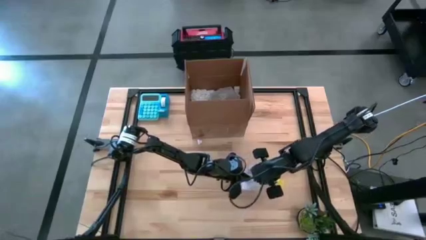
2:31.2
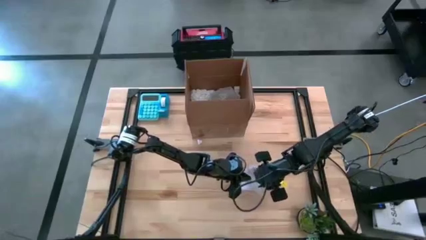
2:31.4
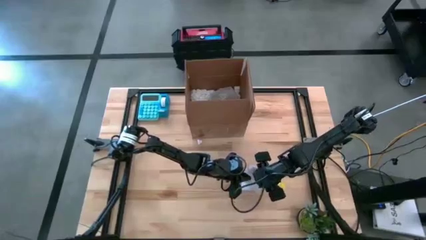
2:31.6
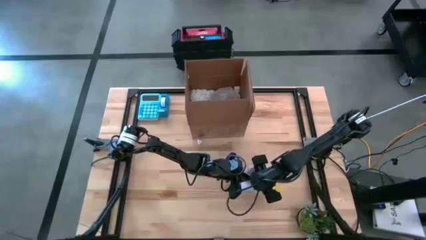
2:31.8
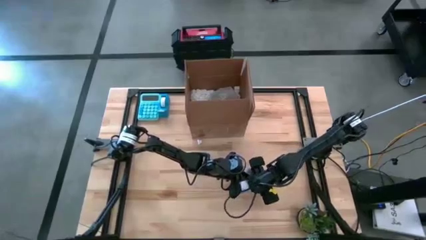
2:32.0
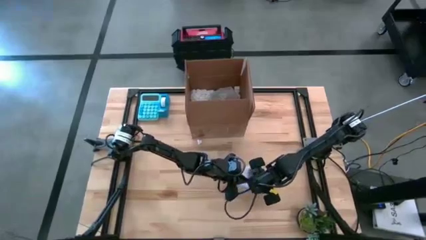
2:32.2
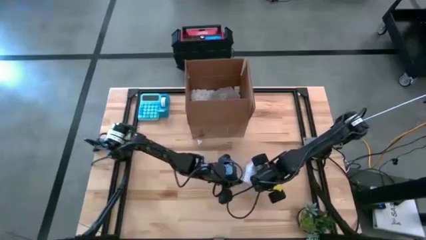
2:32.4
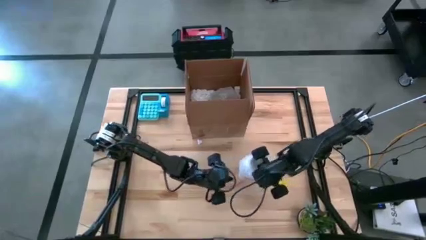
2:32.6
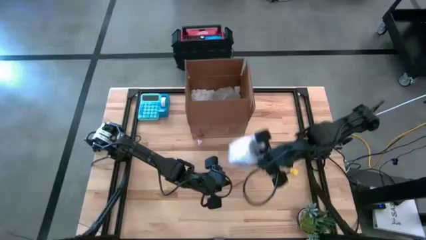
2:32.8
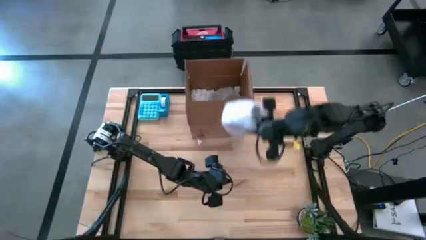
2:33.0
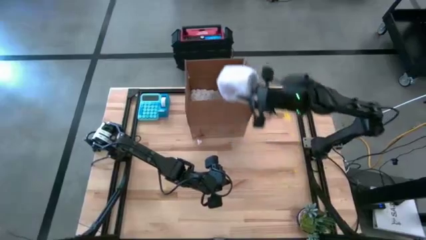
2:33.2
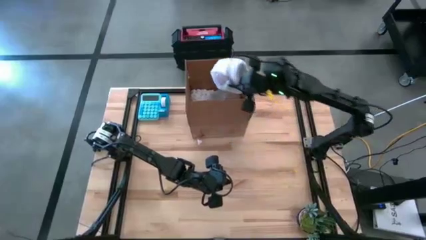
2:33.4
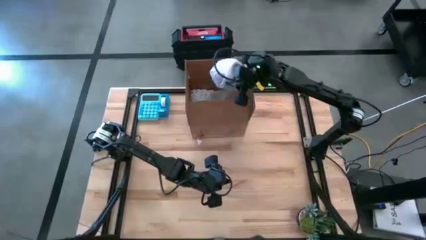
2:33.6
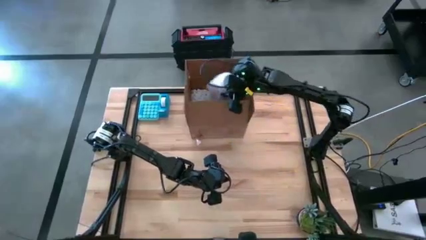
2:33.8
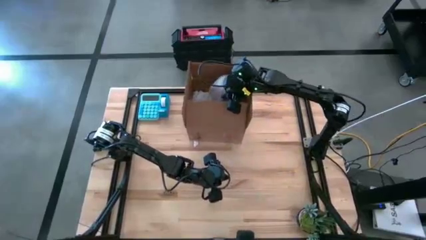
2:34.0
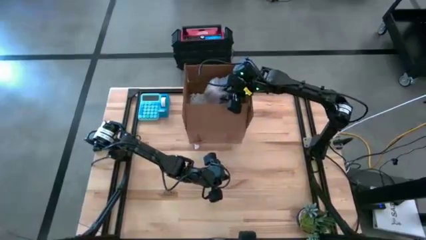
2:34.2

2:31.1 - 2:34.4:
Task: wrap mug
Put the purple wrapped mug into the box

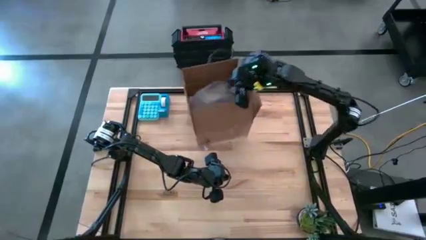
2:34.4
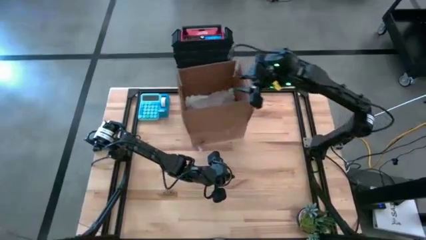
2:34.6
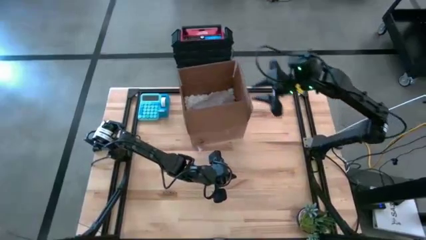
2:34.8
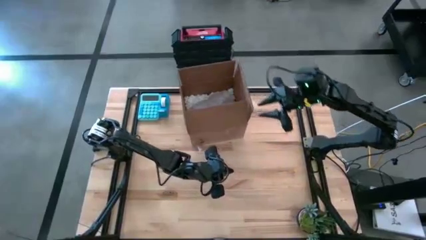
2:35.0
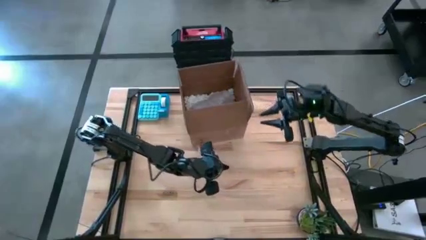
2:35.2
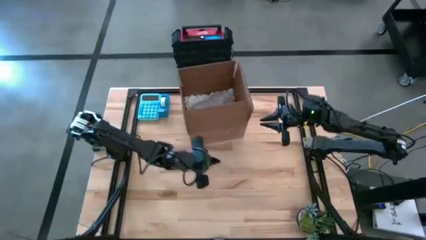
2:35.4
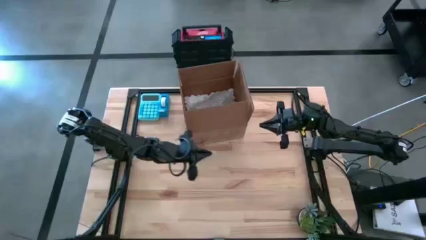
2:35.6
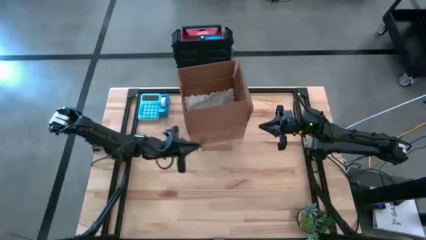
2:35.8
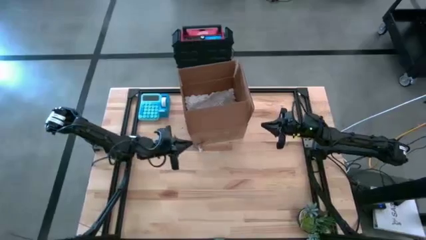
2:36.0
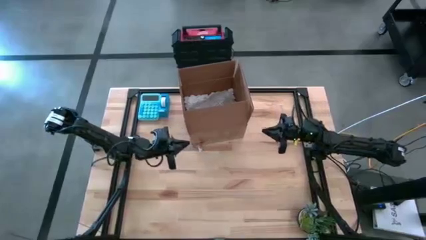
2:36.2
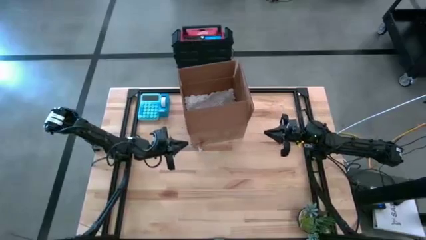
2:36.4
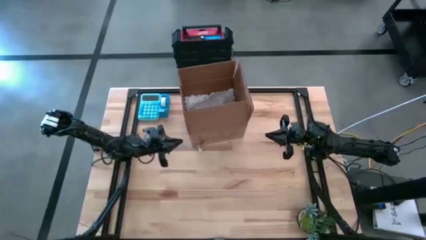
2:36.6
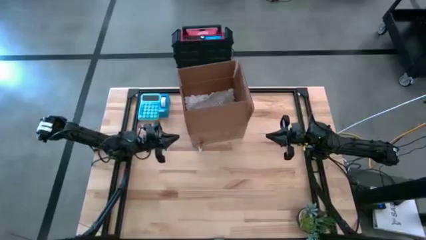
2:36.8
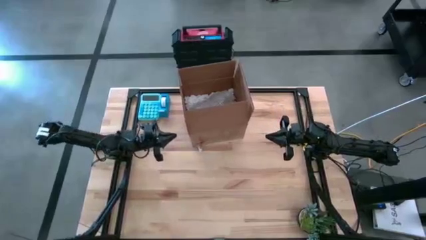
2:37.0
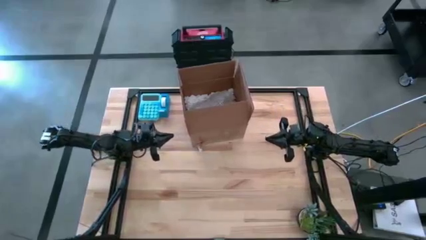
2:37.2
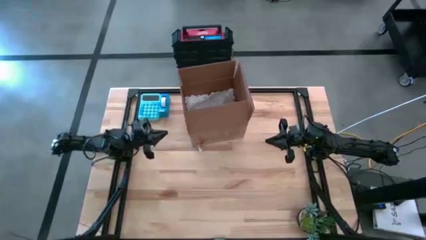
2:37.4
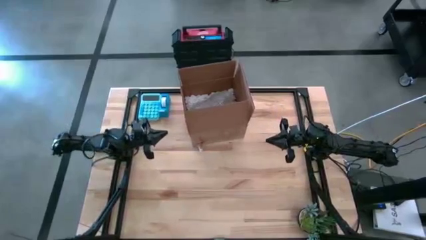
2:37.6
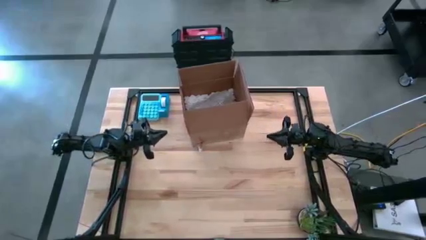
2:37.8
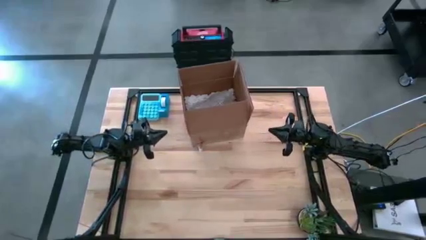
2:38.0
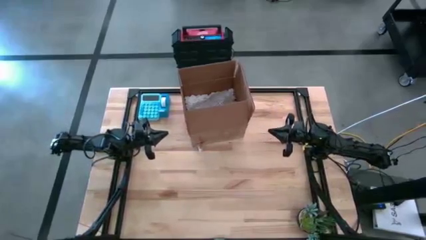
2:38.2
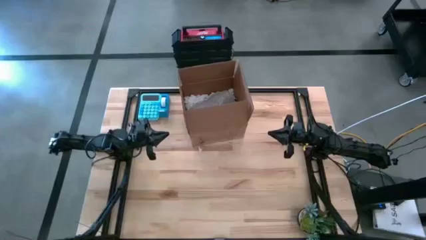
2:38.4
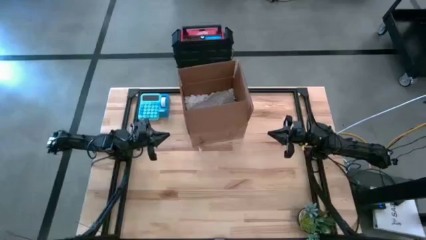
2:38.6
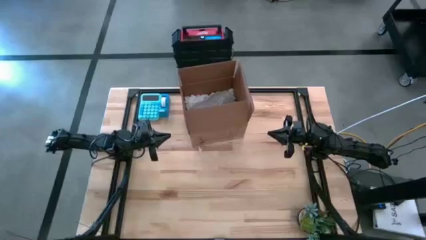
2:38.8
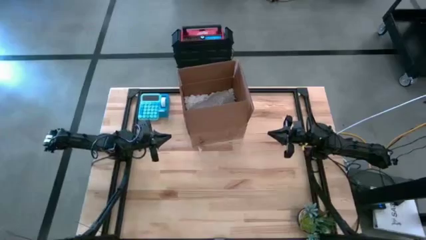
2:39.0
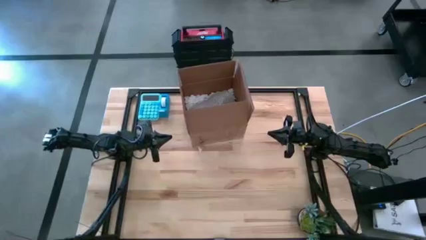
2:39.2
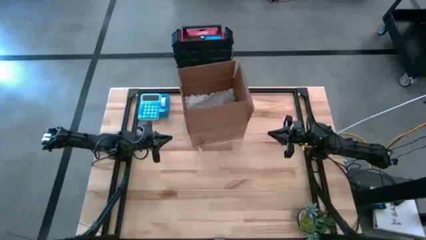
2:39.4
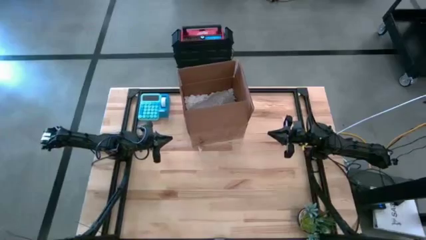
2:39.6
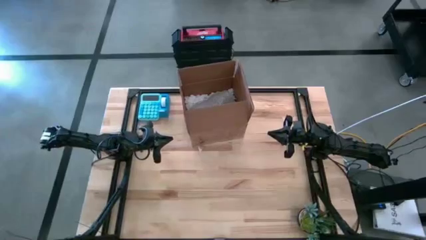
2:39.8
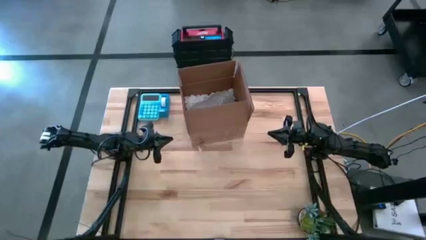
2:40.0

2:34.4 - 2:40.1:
Return to Home Position

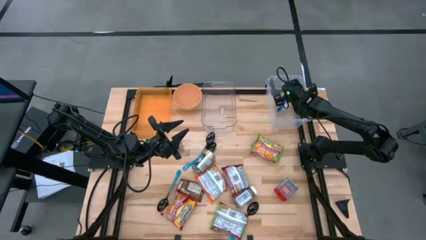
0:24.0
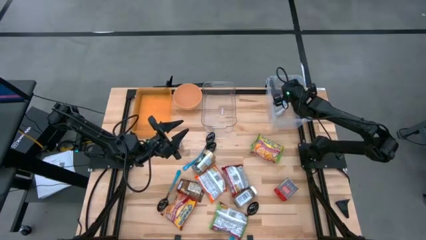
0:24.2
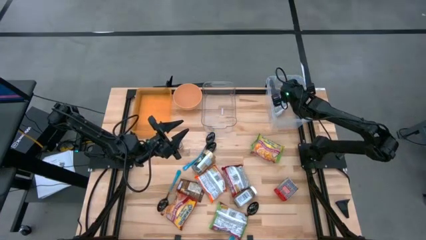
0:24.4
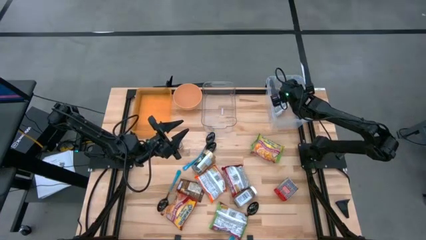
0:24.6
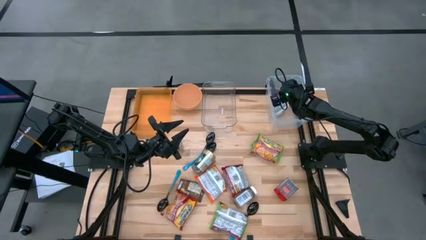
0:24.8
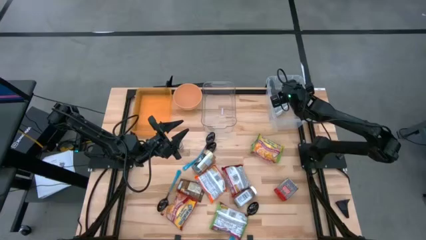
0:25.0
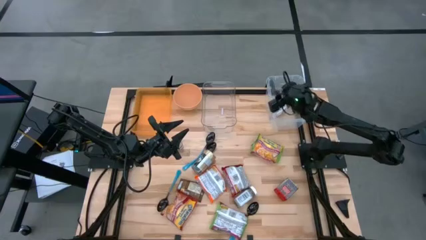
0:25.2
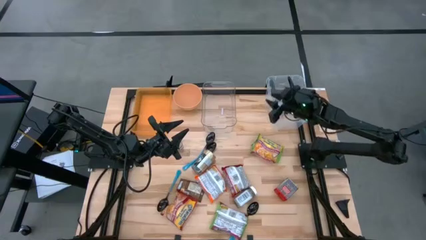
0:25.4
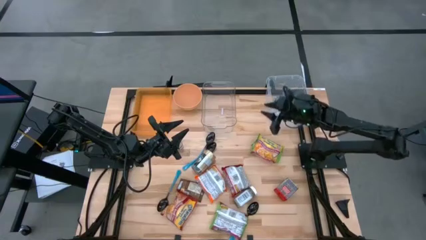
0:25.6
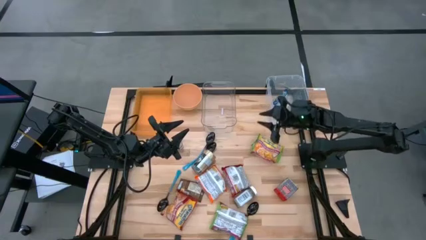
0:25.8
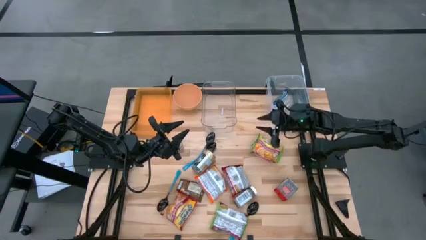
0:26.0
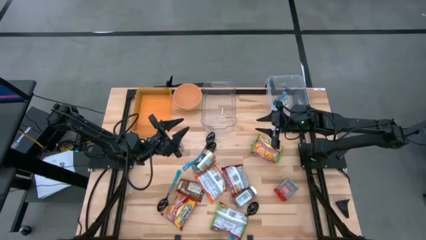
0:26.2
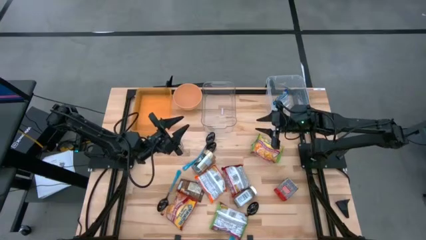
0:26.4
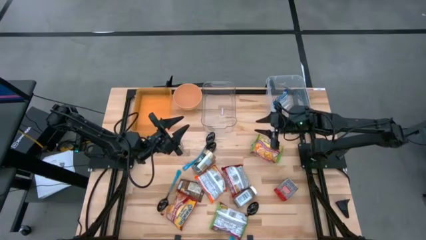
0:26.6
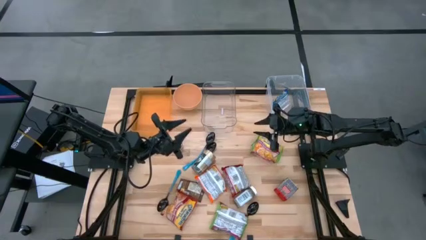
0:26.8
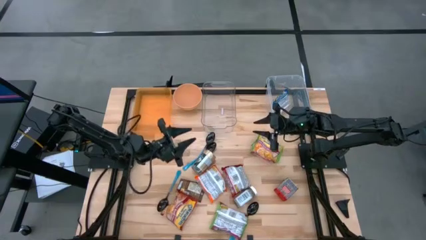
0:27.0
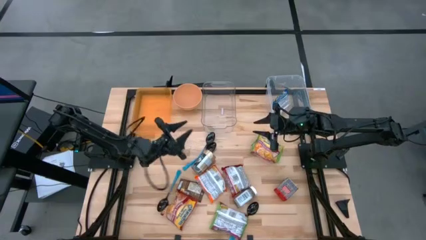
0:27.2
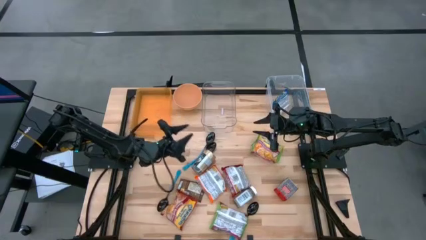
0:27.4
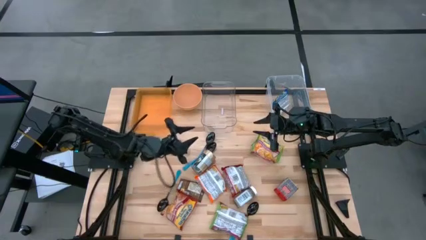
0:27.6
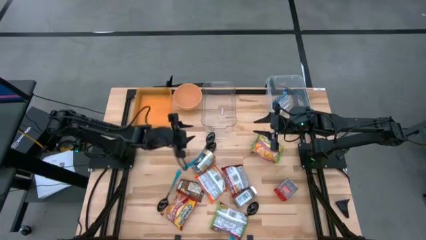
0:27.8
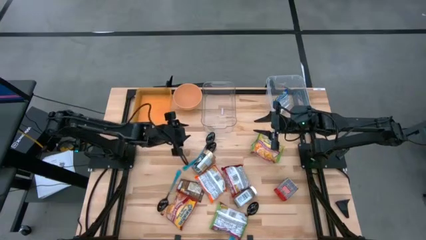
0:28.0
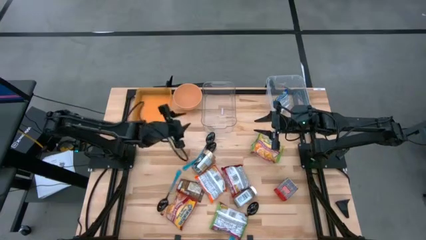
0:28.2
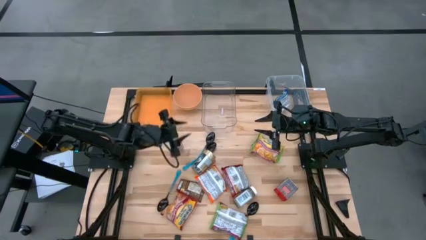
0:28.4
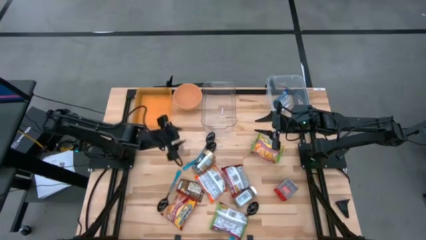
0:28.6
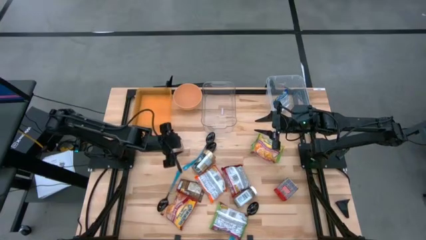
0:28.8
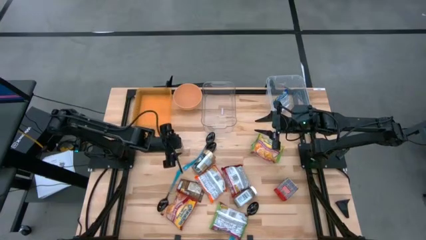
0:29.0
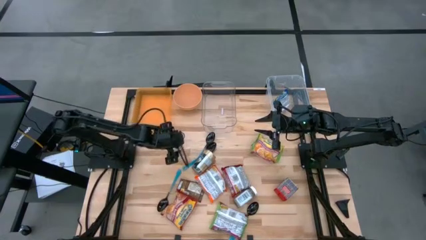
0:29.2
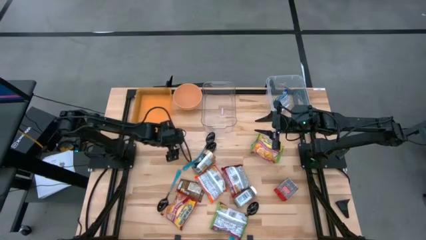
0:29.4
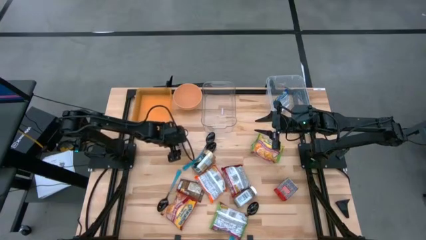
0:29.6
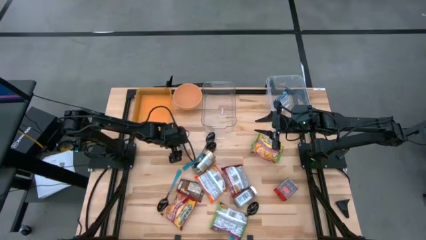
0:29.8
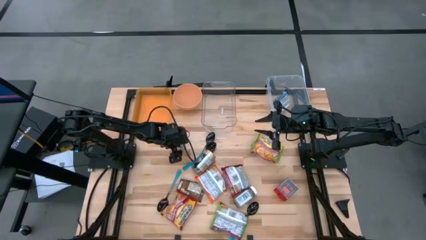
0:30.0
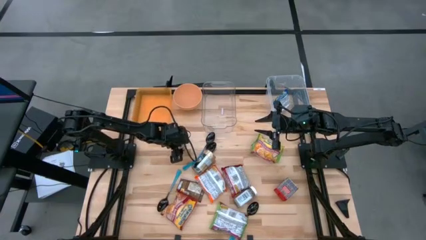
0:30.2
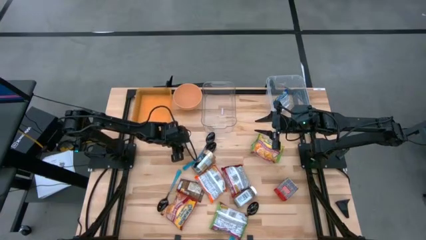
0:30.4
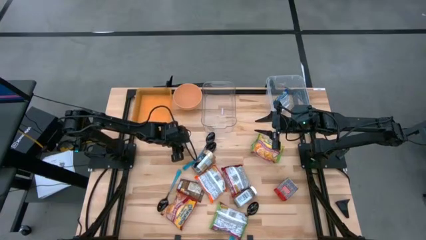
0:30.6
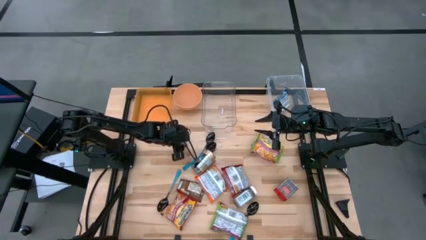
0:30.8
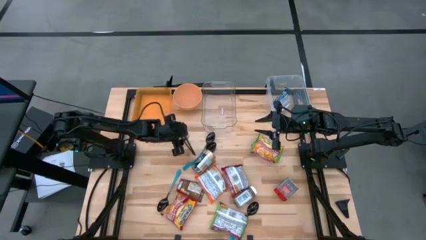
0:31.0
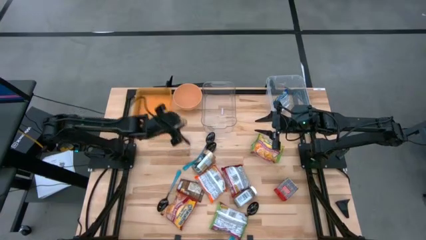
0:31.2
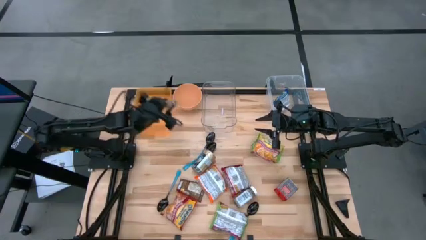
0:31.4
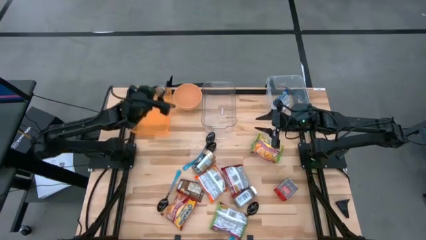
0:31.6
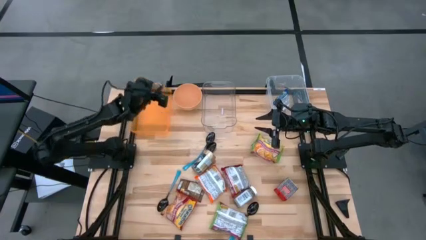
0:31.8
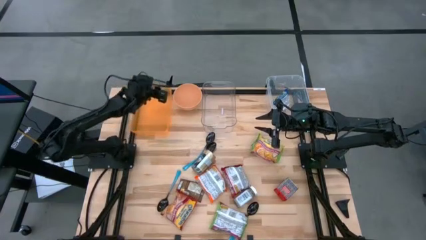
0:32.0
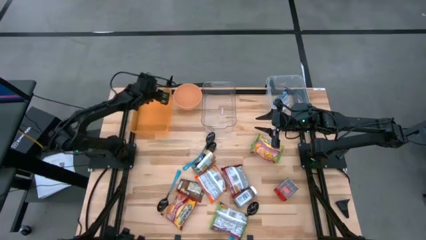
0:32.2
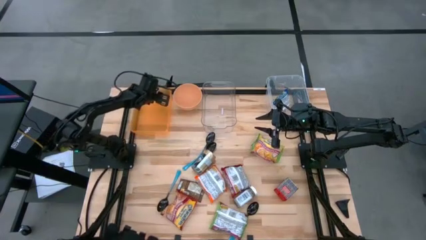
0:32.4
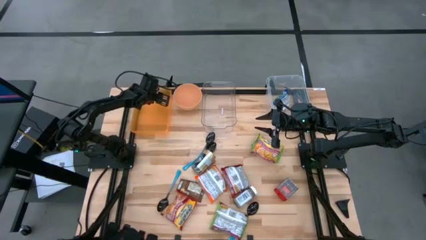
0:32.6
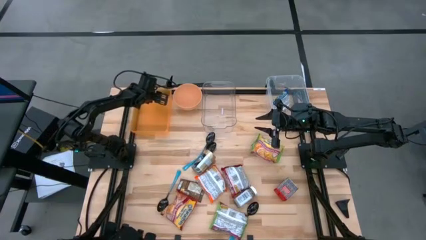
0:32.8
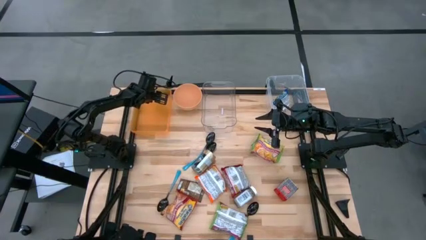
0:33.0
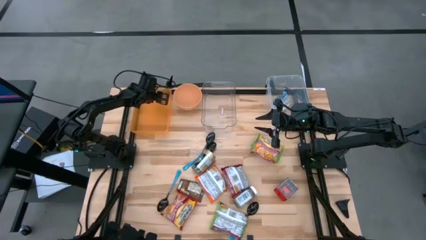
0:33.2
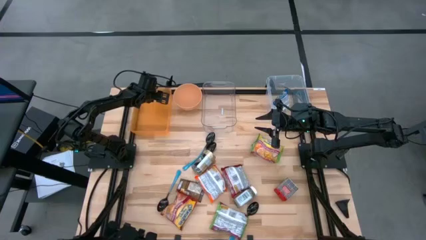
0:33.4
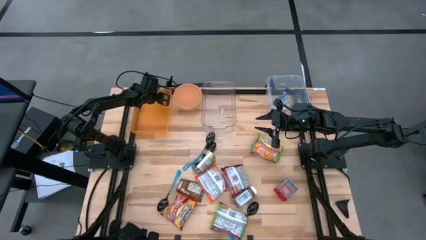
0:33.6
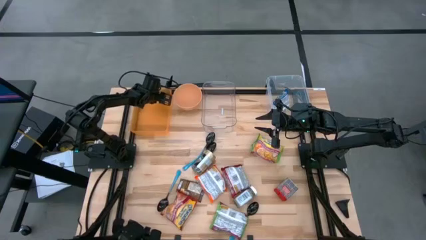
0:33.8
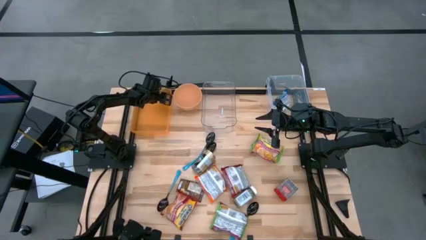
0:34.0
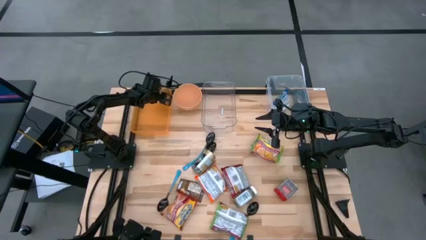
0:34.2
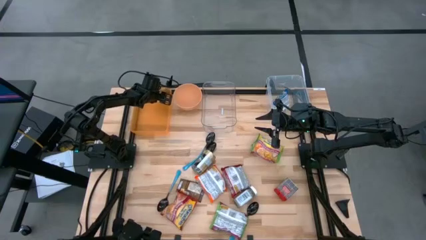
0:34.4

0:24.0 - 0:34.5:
Task: Pick & Place Food Item
Put the brown seasoning bottle into the orange bin
